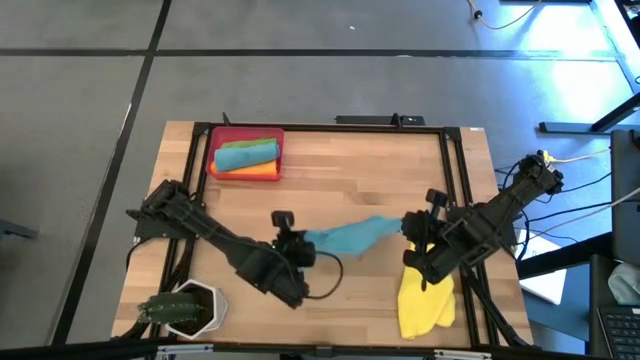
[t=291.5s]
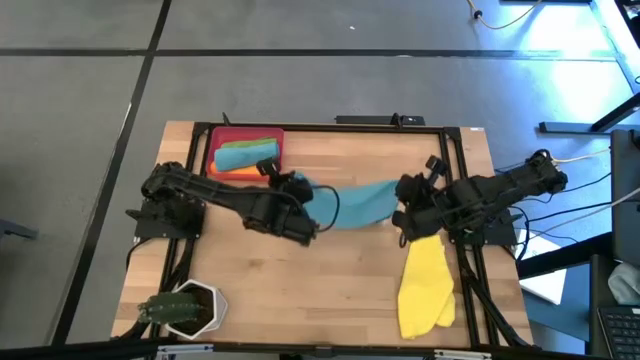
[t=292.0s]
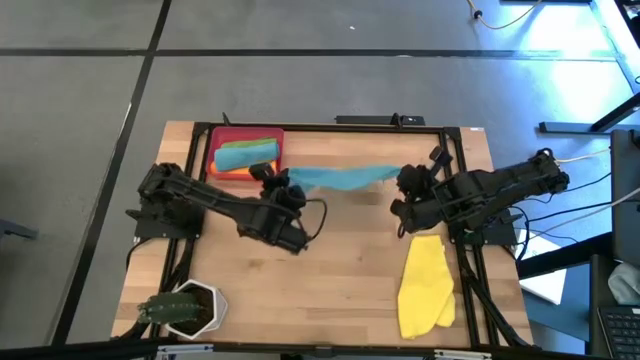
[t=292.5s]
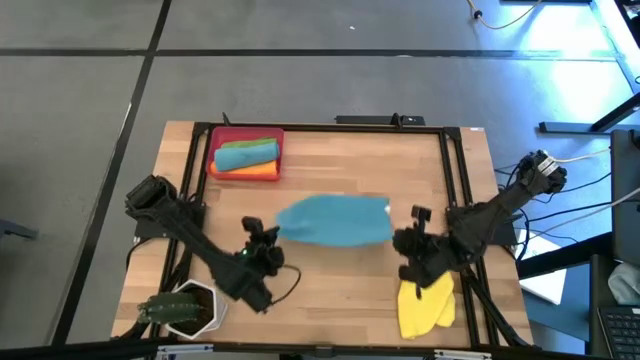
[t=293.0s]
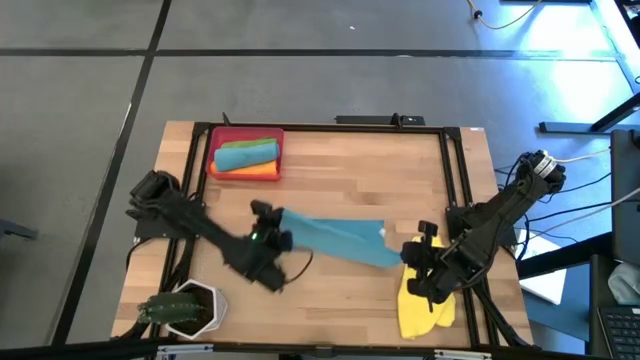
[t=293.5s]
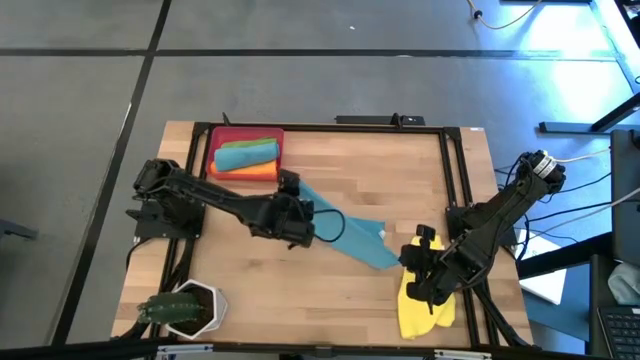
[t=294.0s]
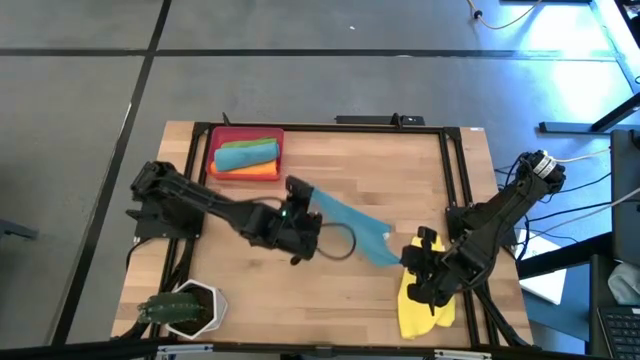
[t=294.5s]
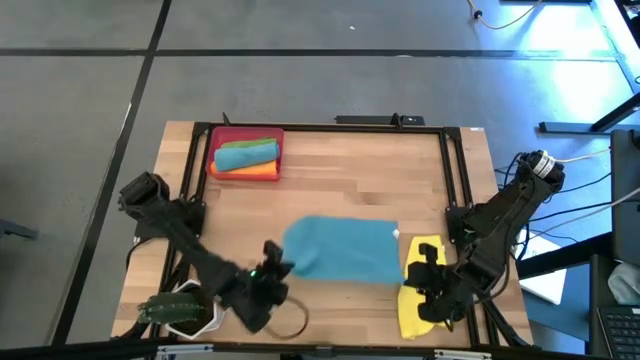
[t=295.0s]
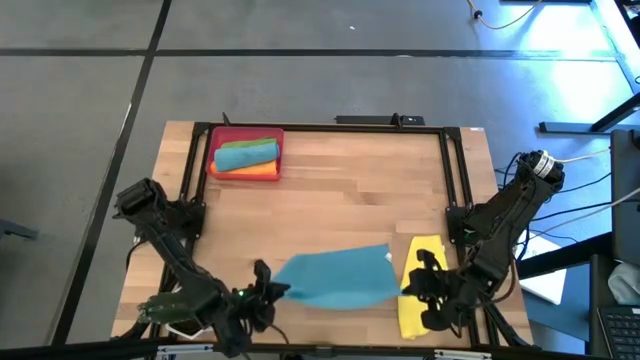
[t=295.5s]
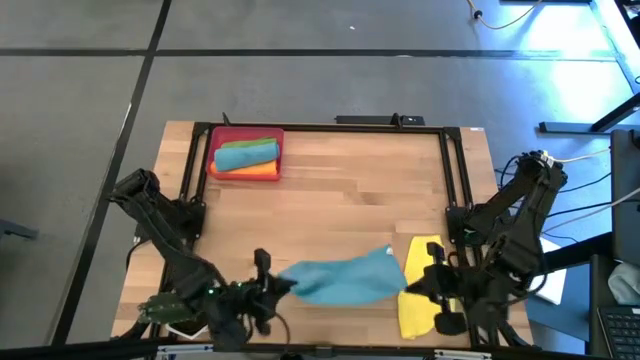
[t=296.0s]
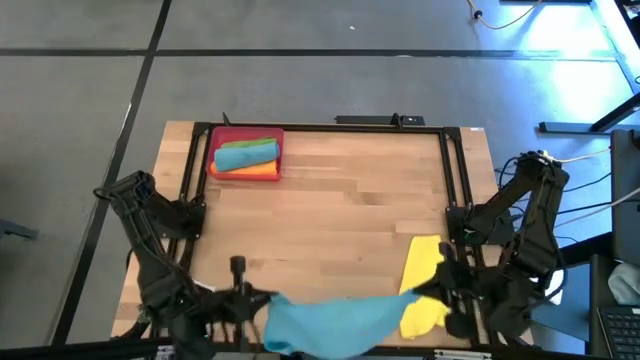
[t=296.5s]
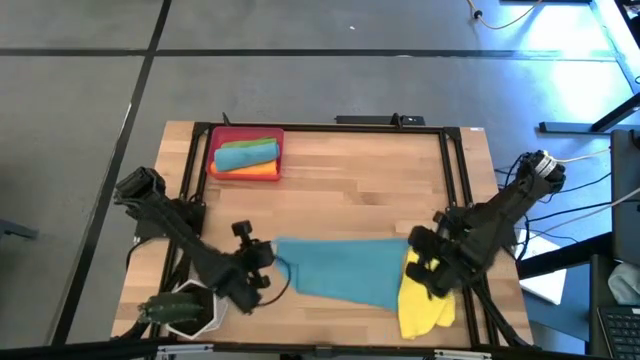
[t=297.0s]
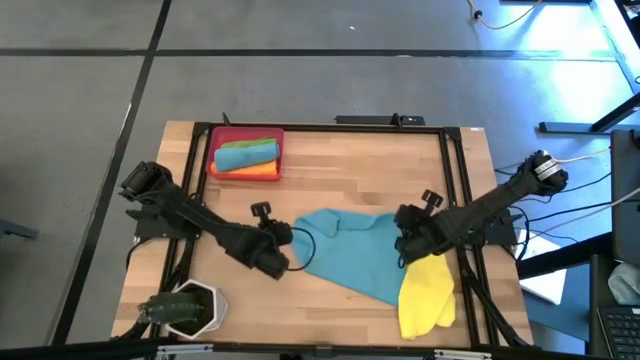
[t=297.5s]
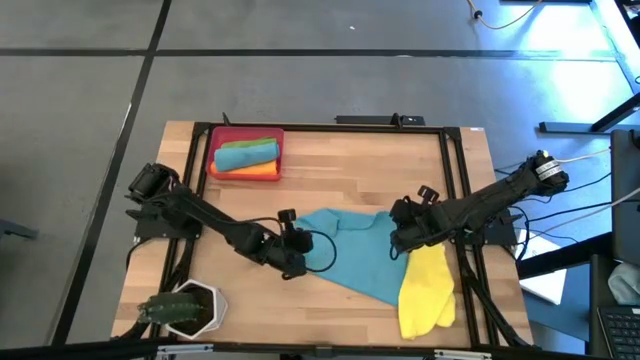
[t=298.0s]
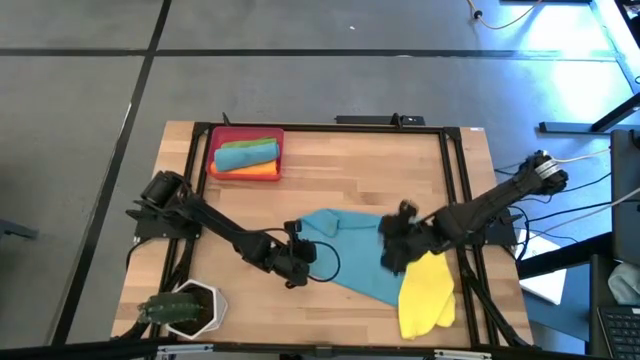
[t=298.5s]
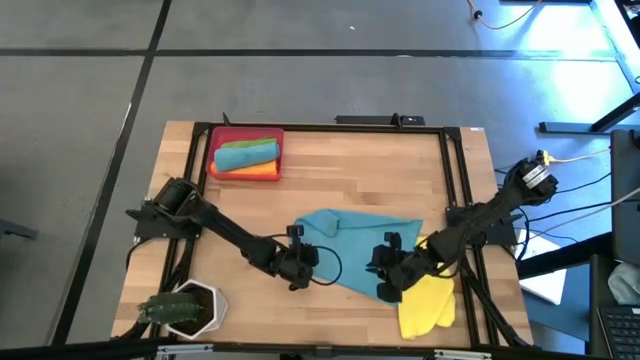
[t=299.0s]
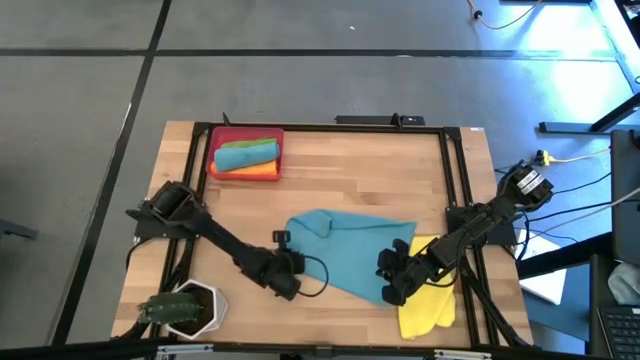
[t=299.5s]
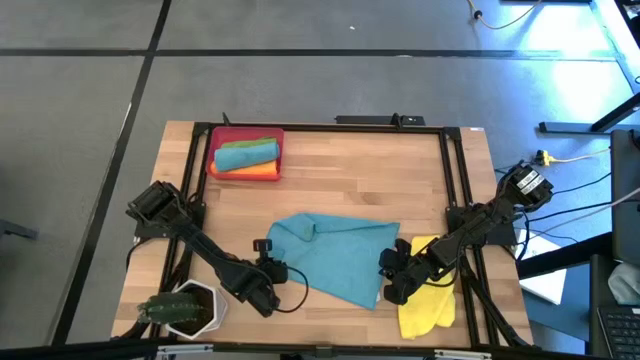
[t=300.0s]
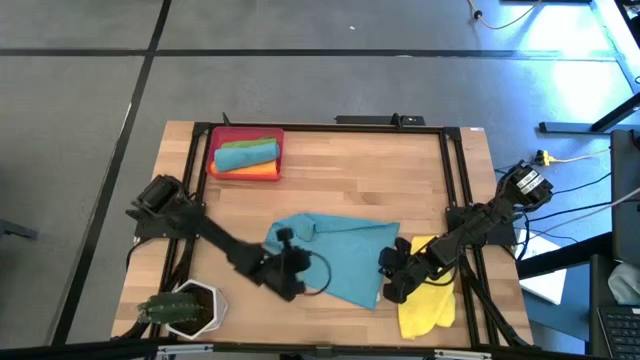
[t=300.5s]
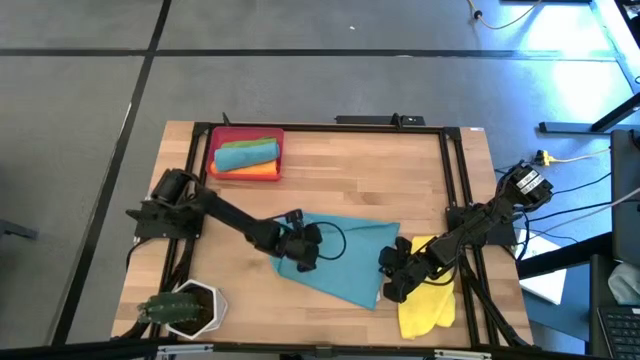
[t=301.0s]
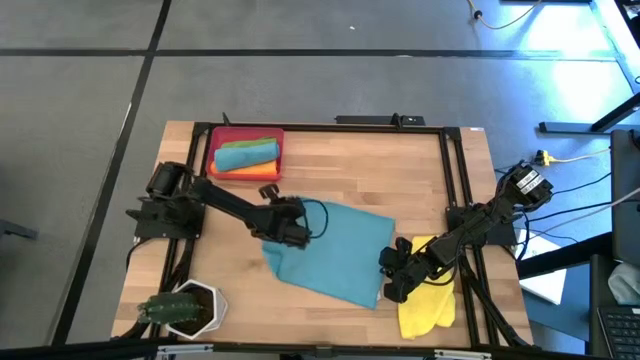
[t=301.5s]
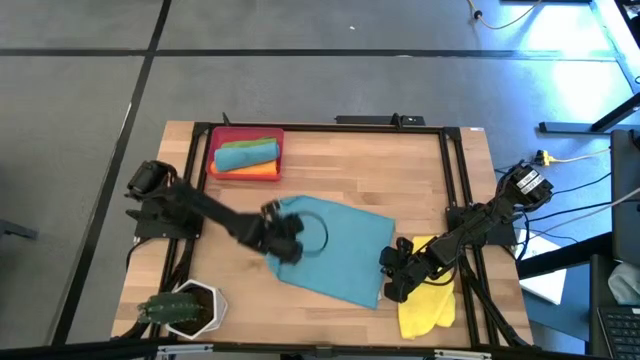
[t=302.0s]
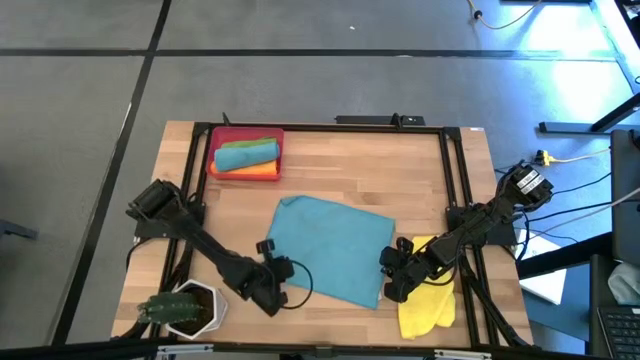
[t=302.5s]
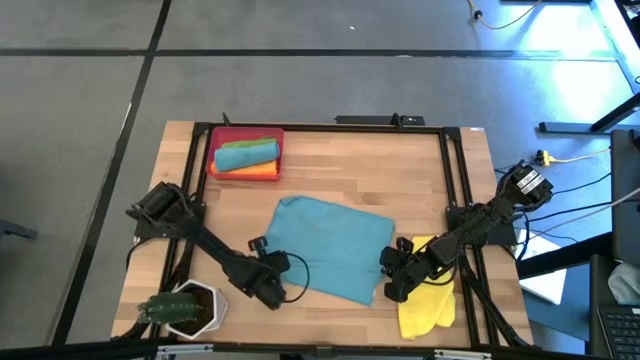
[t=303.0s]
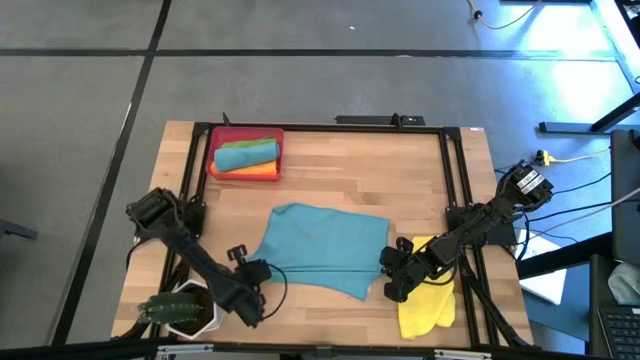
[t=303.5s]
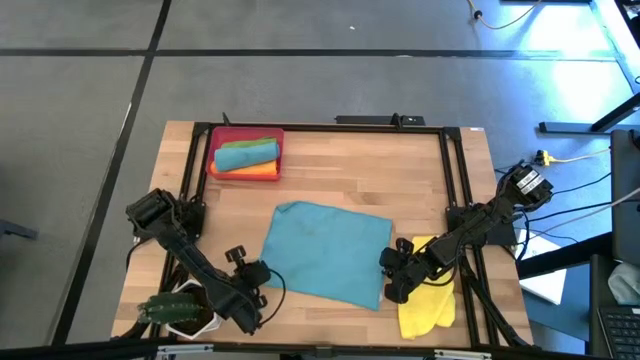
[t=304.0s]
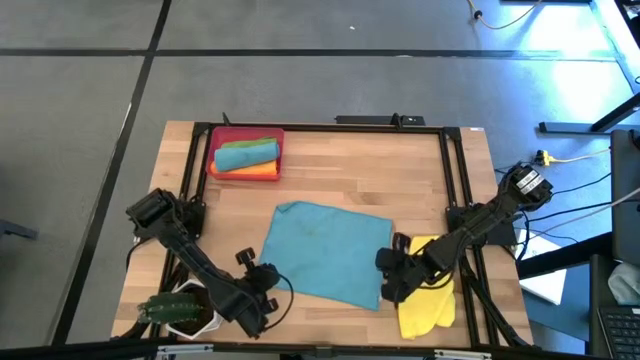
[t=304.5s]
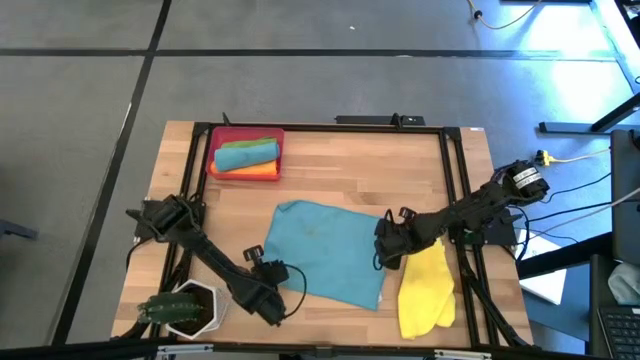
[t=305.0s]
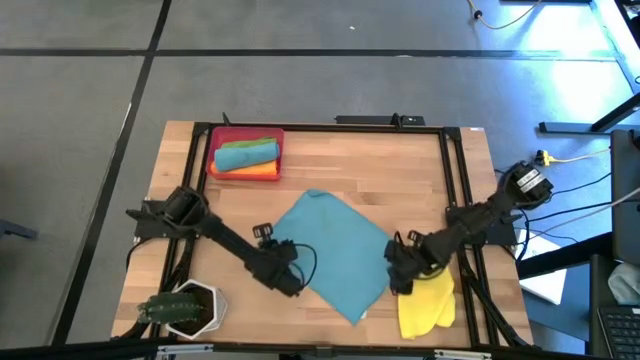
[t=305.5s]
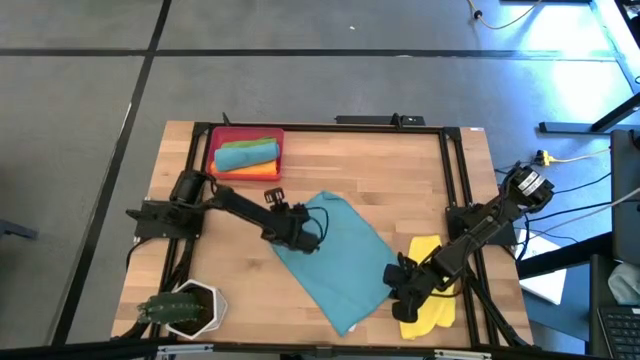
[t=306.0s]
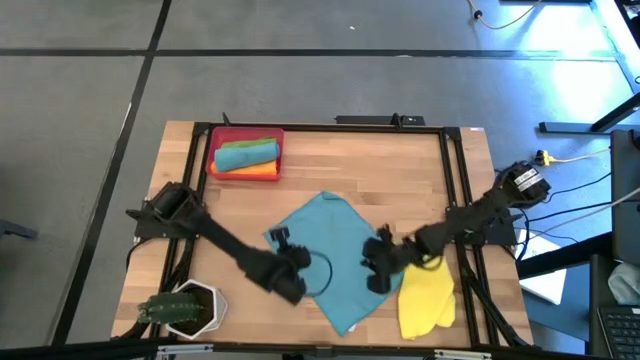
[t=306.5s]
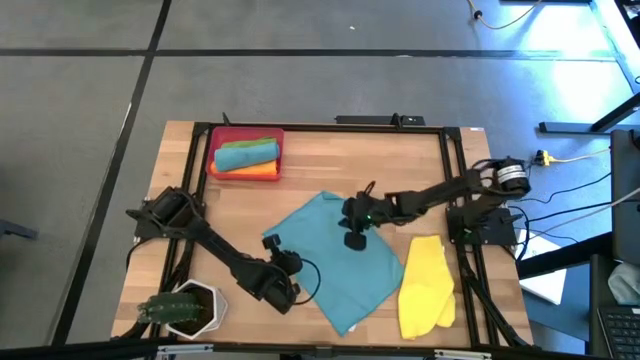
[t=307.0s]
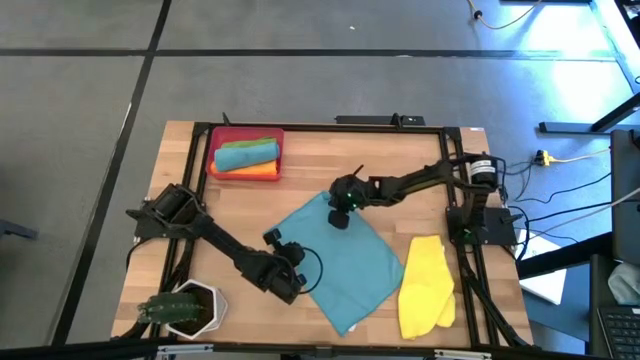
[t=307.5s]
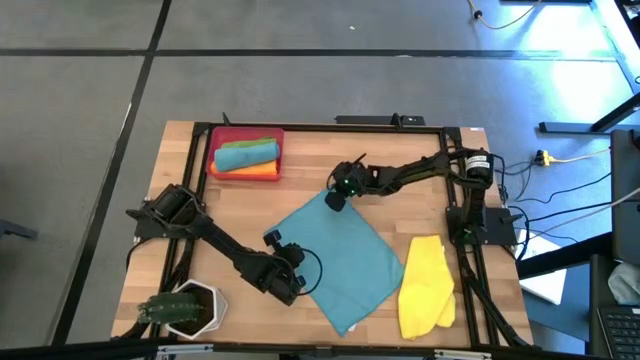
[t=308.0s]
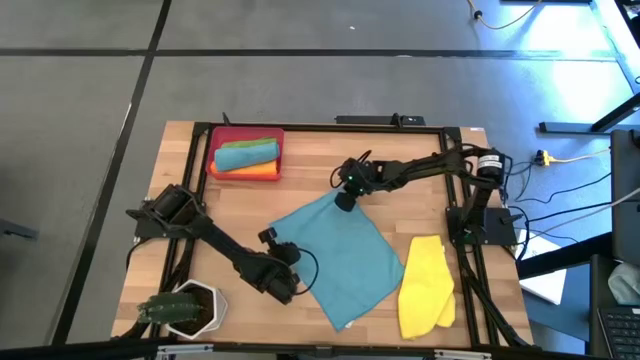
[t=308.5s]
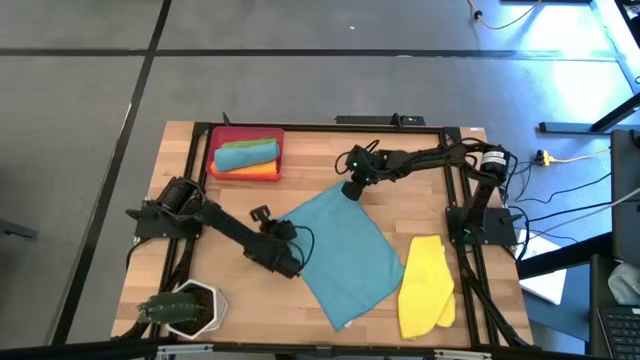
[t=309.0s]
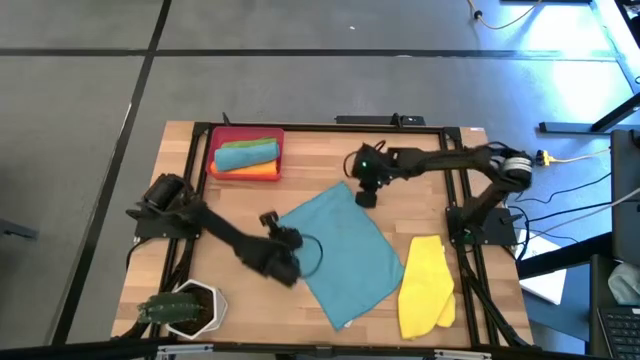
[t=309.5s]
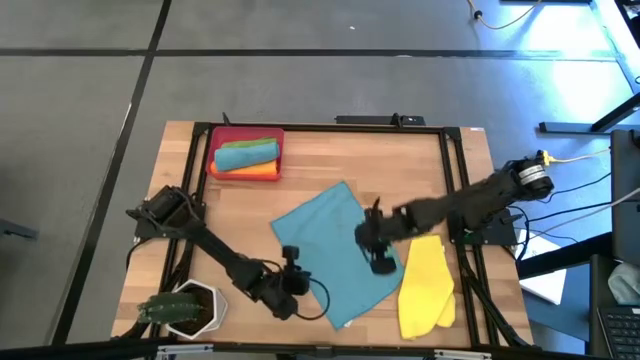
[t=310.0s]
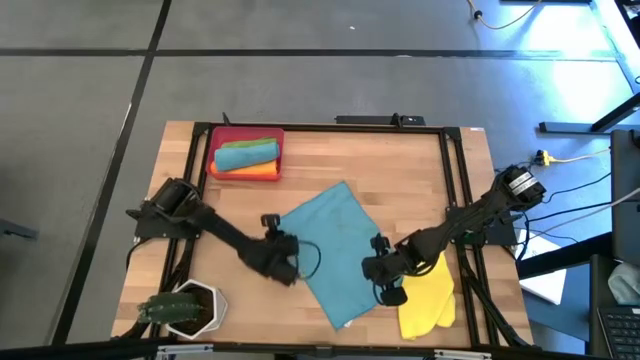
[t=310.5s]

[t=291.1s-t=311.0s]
Task: Roll microfiber towels into tight, uniform cylinder then place into a basket
Fold the blue microfiber towel

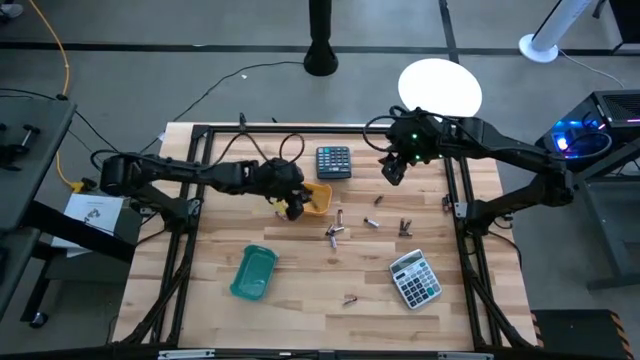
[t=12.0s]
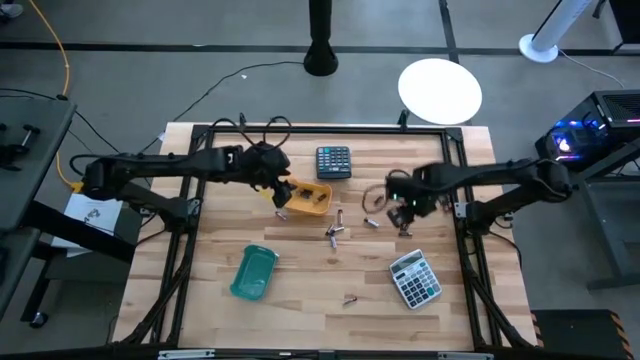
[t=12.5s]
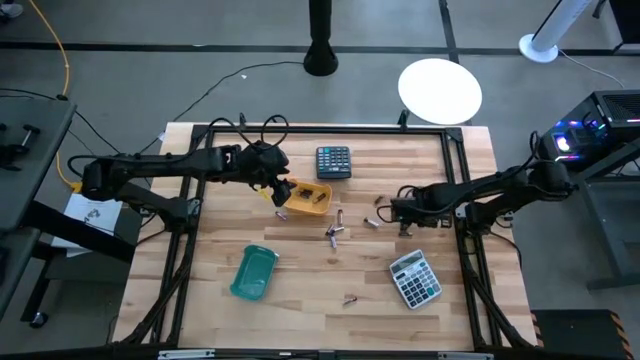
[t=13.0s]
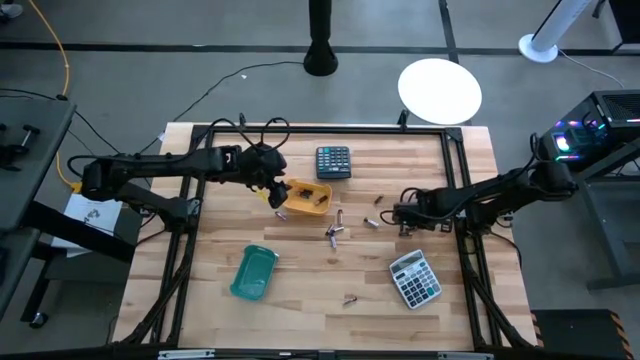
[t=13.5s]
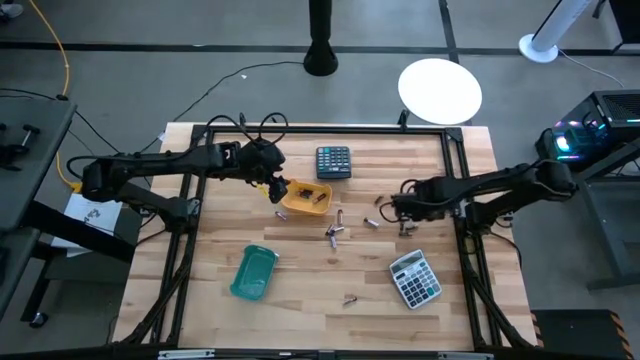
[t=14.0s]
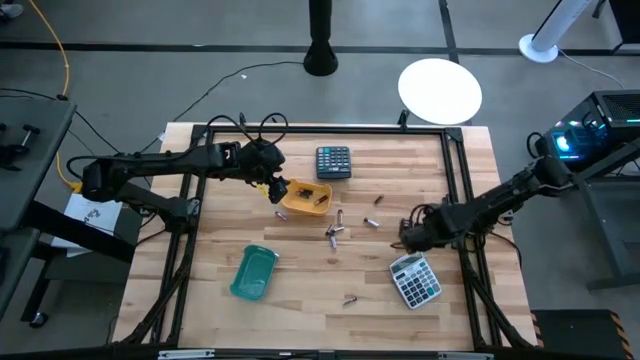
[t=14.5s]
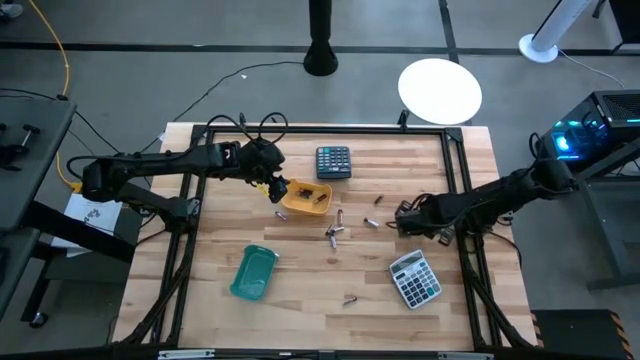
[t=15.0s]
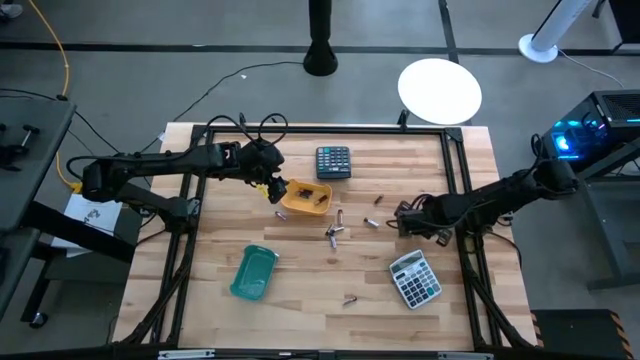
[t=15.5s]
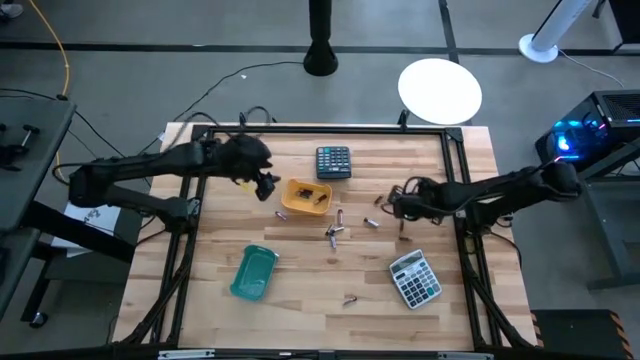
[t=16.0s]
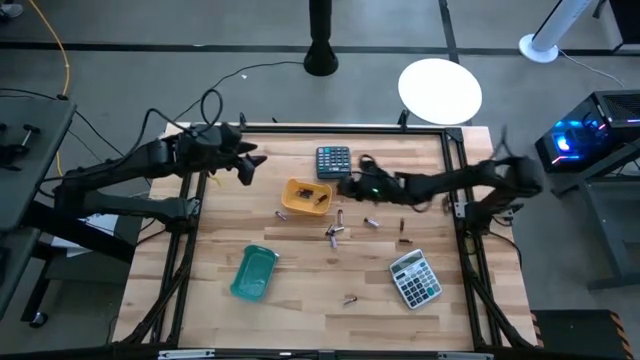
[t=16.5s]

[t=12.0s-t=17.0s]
Task: Sort batteries
Put the black battery into the yellow bin
